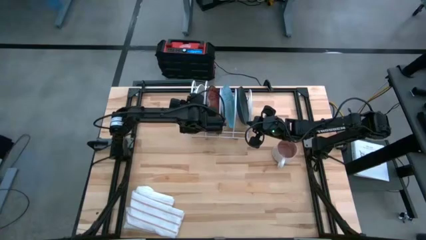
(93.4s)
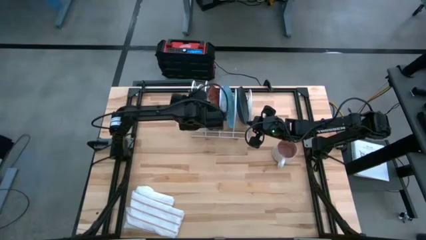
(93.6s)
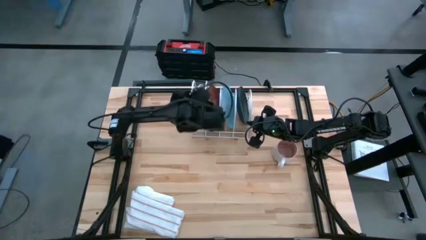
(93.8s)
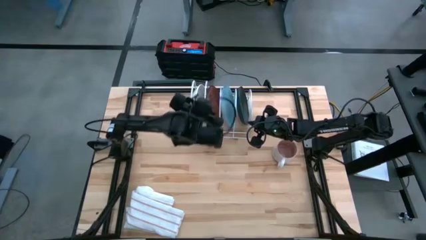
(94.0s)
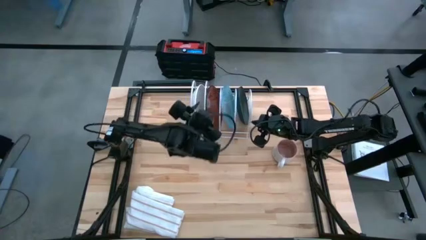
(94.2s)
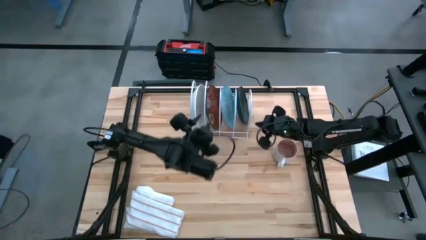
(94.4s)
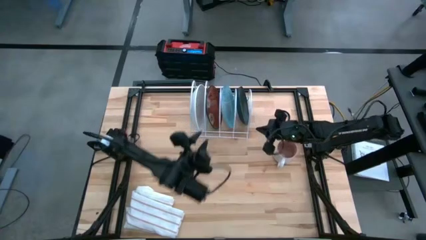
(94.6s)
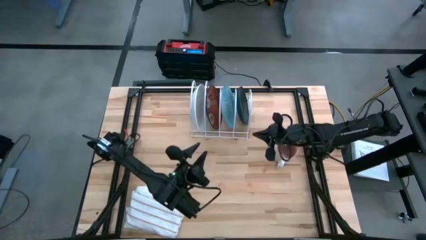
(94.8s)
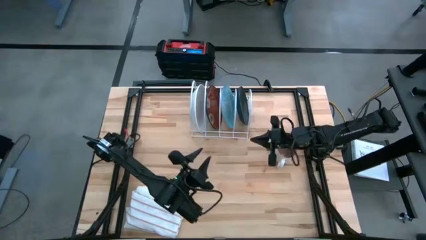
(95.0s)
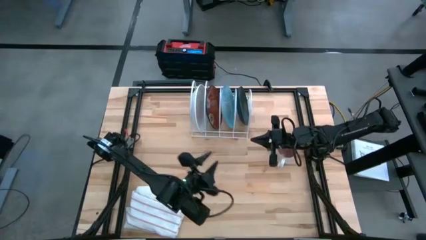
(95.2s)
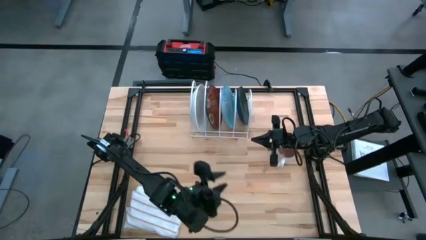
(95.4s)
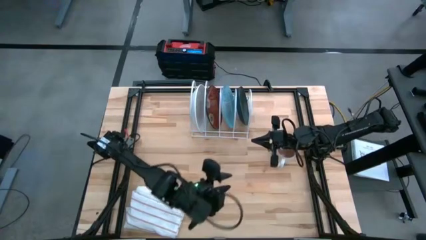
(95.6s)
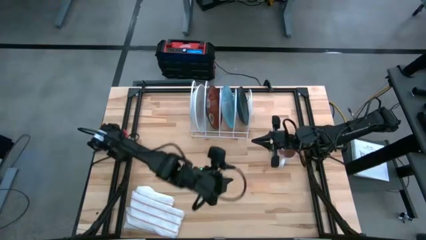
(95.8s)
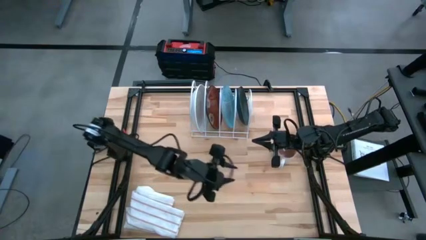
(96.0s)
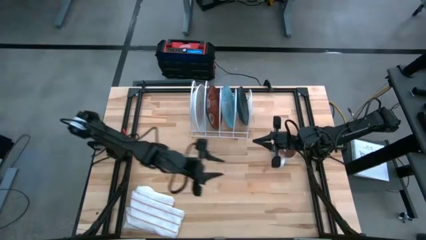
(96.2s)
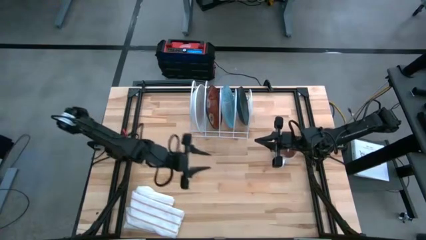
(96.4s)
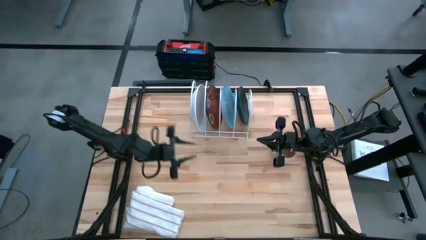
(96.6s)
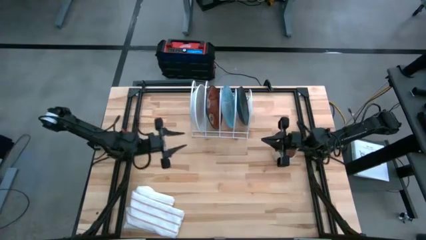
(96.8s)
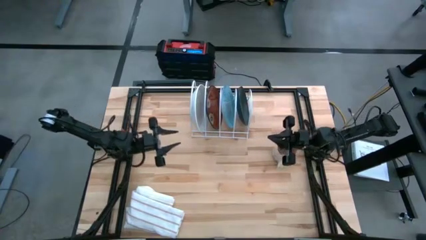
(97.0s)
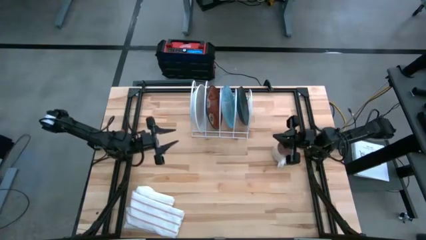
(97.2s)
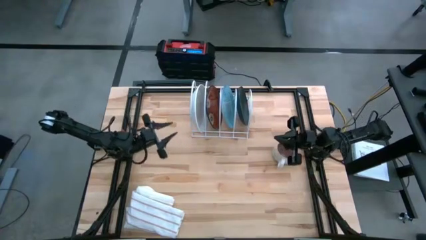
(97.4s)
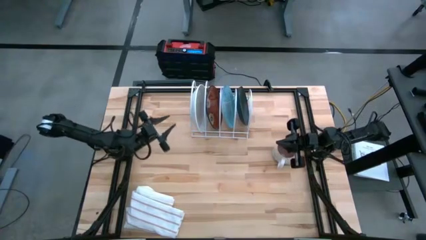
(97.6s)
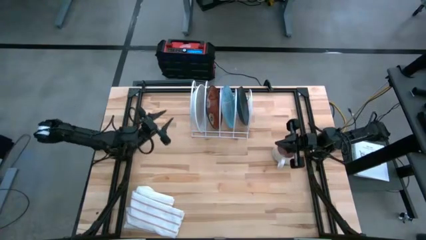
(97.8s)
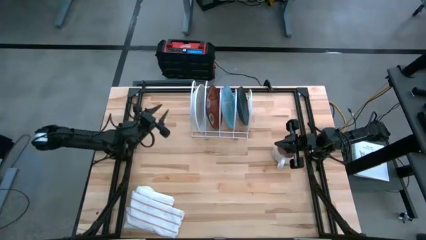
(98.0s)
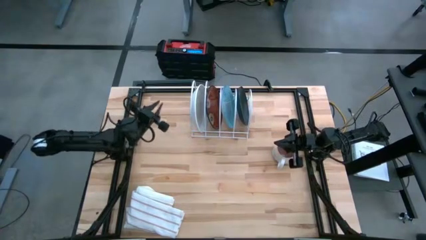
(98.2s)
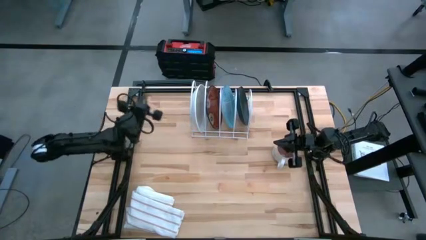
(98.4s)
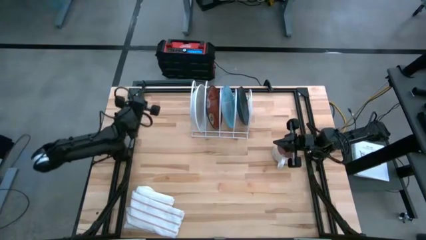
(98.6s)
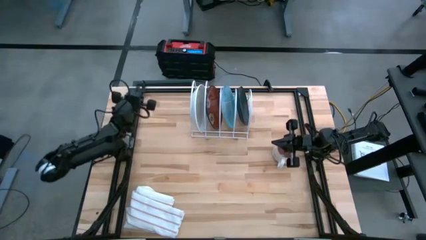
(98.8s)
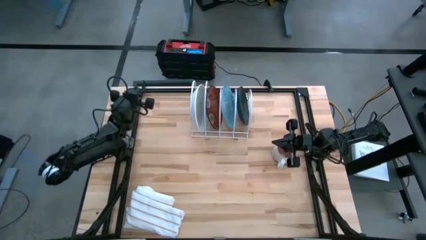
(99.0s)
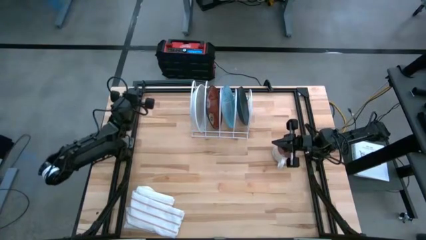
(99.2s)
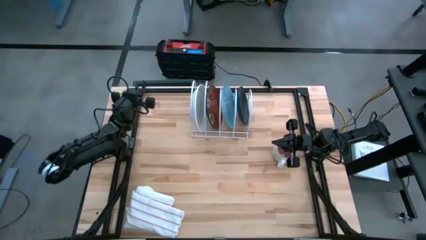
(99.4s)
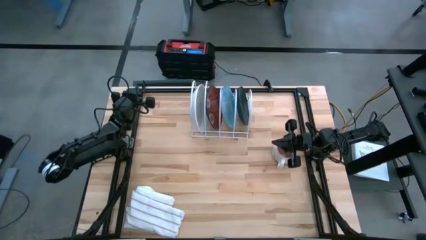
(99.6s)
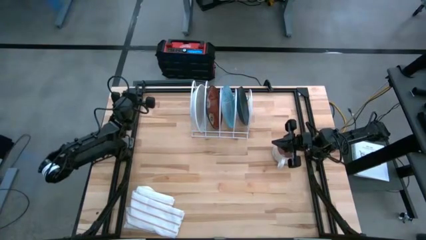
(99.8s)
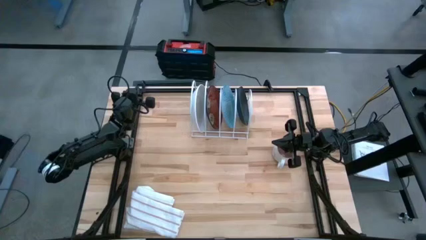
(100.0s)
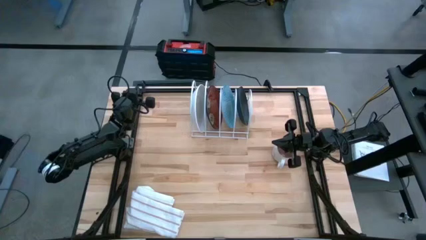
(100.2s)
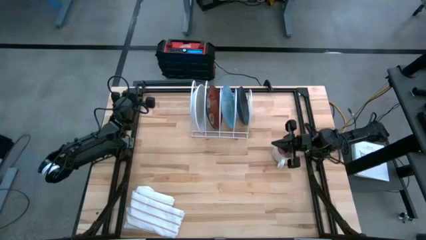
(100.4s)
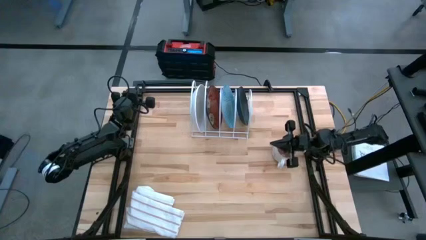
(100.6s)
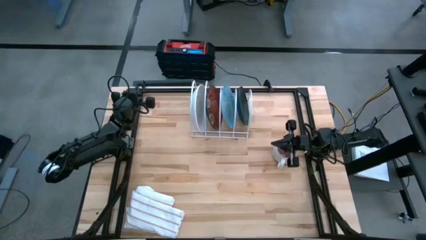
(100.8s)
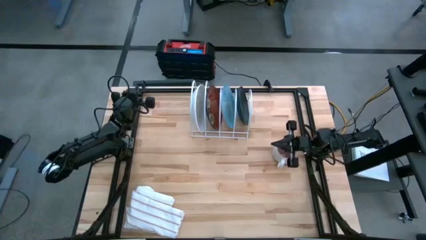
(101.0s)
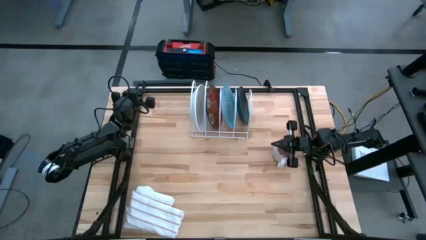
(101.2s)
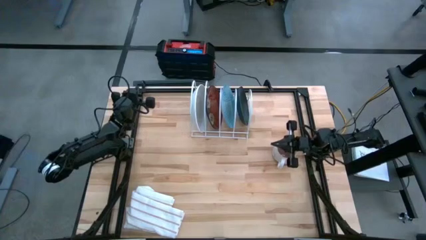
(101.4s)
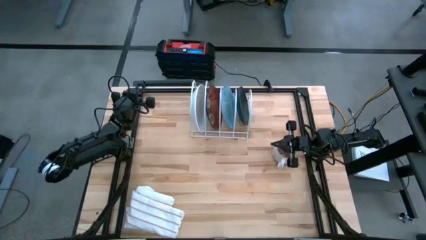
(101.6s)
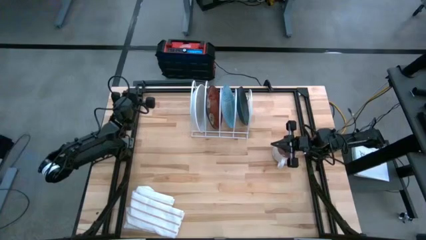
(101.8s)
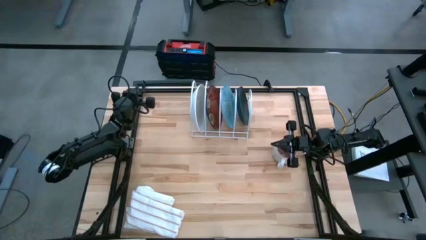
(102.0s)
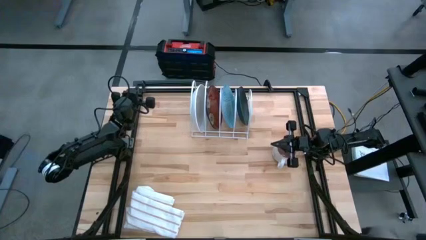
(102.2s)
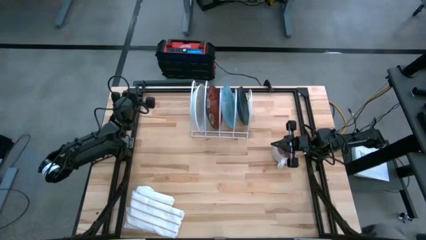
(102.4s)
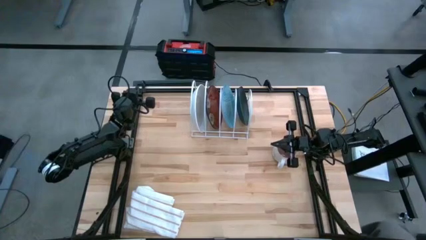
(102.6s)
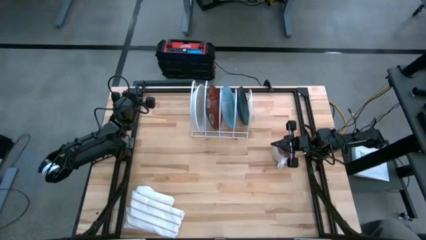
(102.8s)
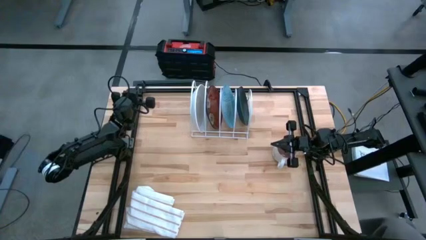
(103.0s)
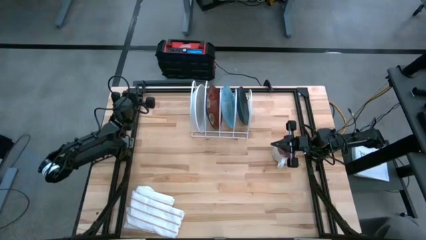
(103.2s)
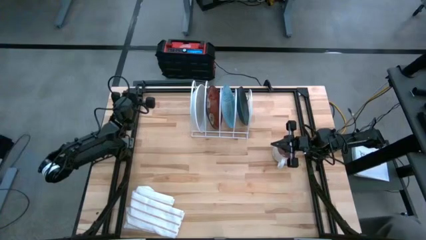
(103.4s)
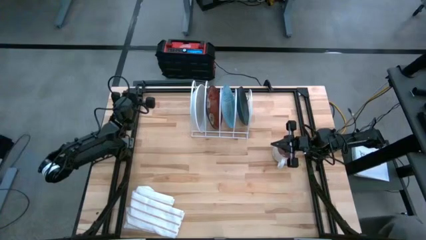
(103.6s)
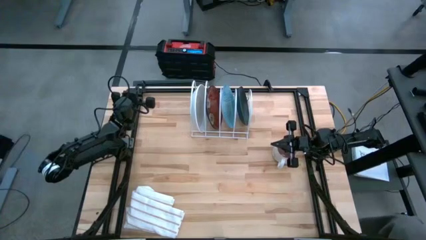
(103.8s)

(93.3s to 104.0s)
Task: Sort dishes
Return to Home Position

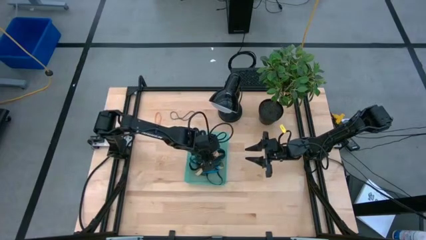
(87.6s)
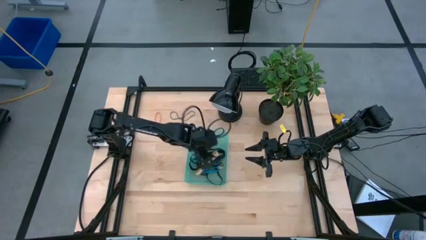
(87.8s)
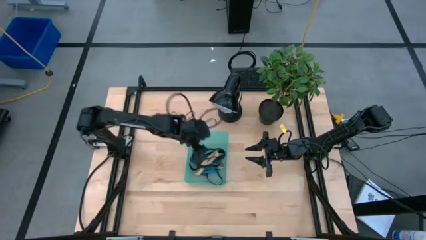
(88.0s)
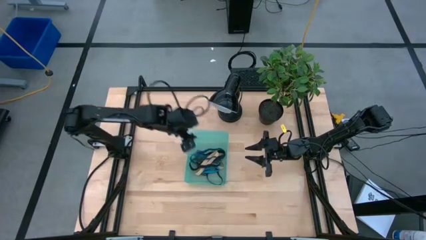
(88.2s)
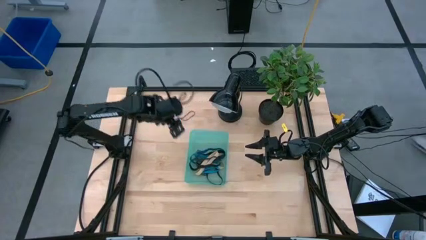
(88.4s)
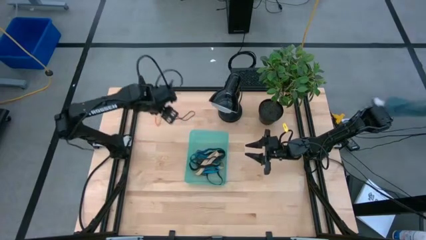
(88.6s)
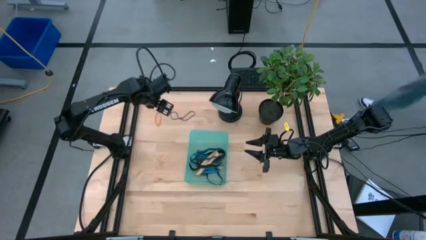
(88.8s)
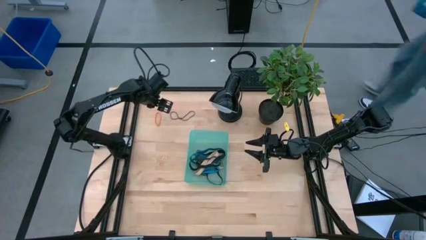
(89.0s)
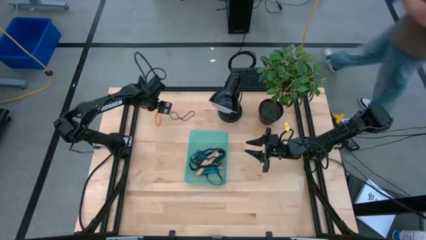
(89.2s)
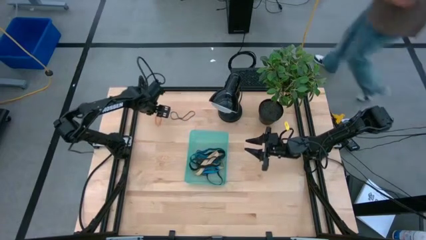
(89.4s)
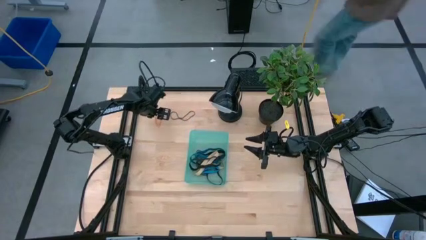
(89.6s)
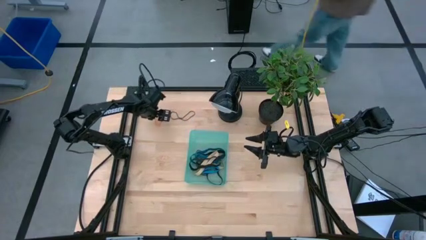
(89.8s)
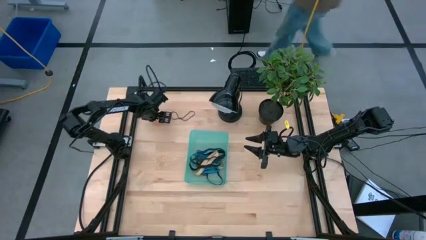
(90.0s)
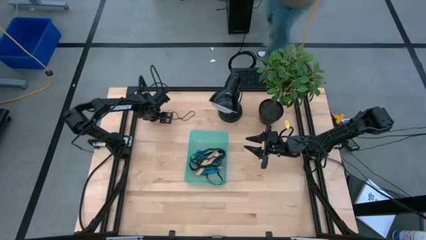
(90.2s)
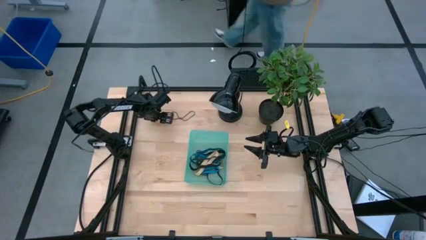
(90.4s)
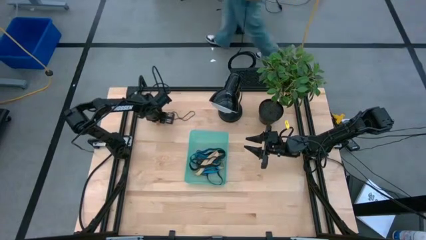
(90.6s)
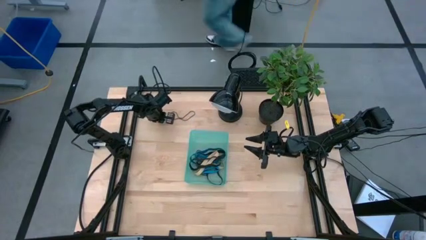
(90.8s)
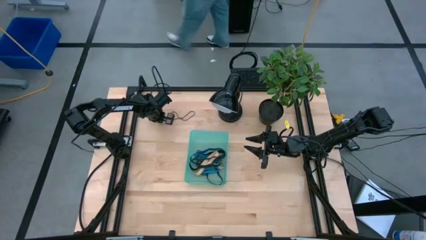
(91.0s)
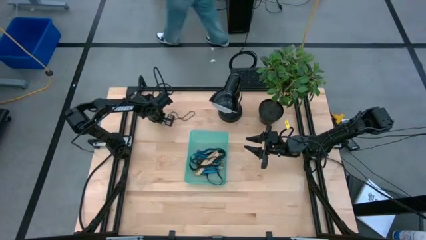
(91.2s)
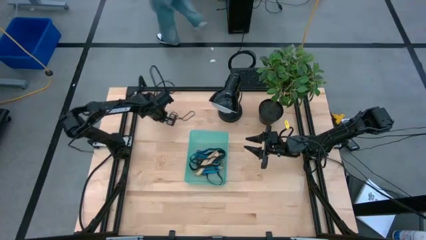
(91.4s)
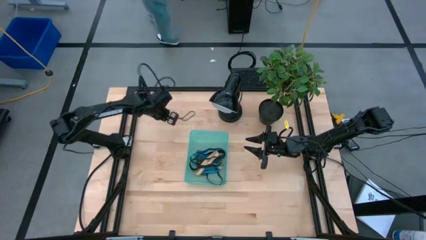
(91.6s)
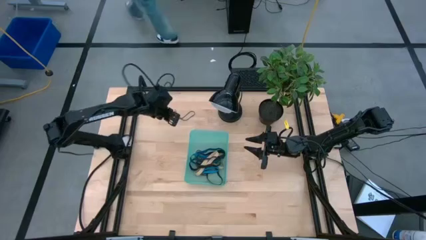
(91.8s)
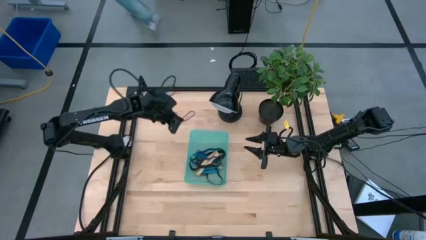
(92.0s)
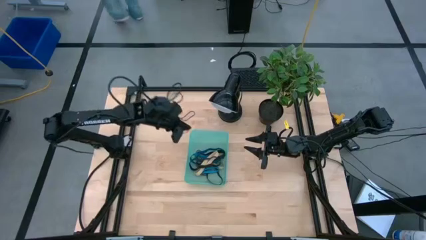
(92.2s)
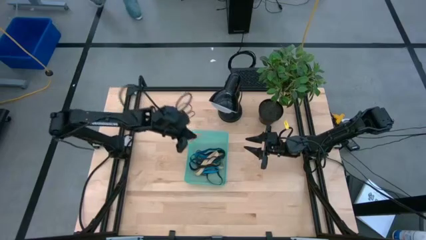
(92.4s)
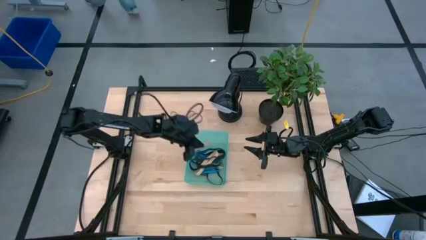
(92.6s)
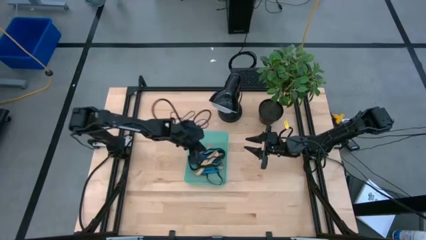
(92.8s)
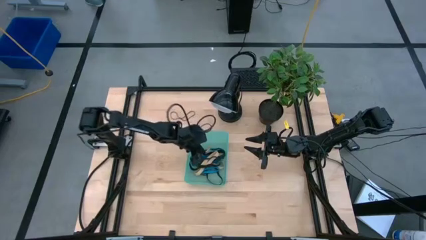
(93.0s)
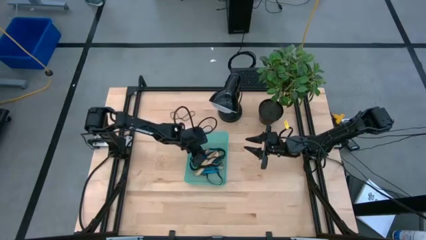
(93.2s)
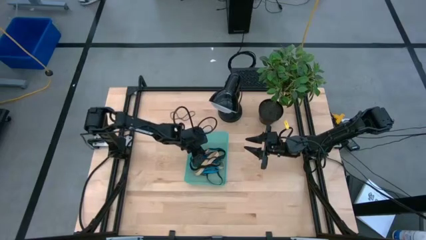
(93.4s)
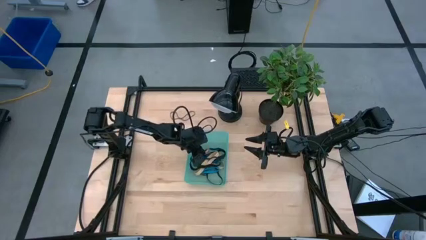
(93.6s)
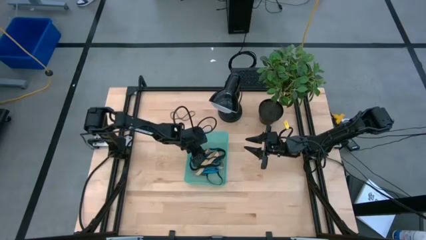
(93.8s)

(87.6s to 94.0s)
Task: Pick and place rubber bands into bin
Put the orange rubber band into the basket
